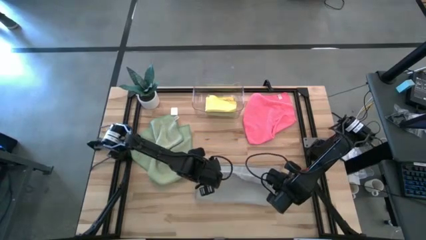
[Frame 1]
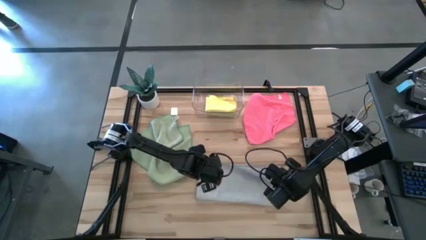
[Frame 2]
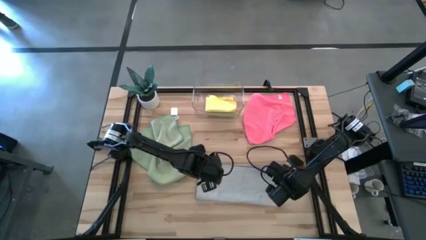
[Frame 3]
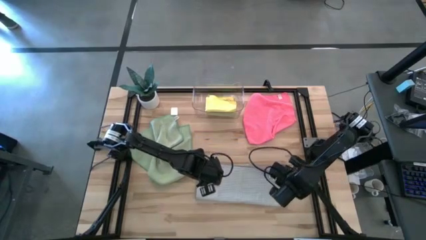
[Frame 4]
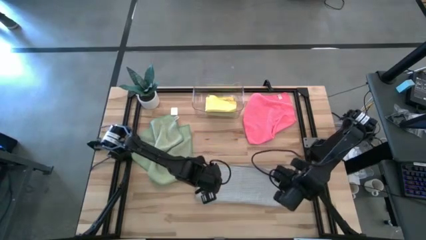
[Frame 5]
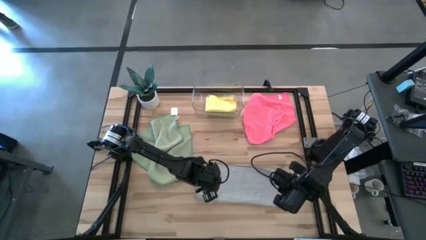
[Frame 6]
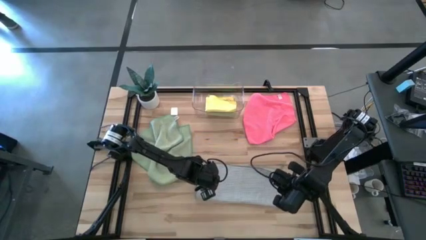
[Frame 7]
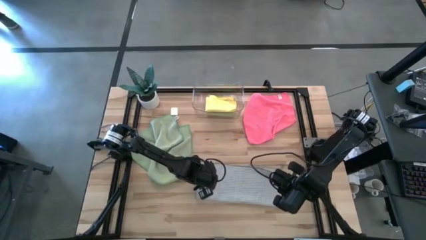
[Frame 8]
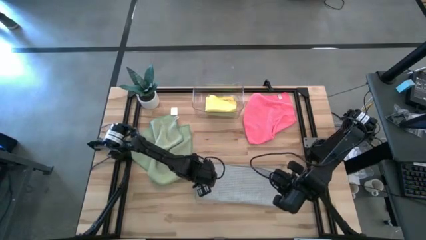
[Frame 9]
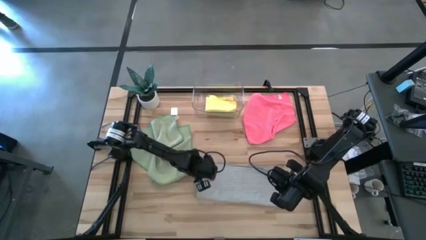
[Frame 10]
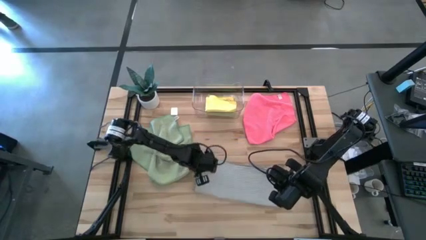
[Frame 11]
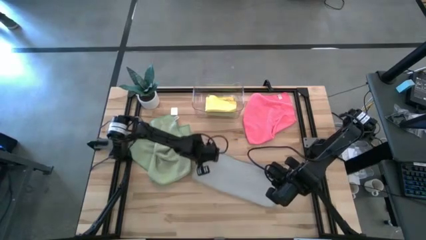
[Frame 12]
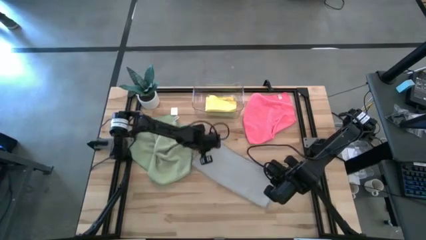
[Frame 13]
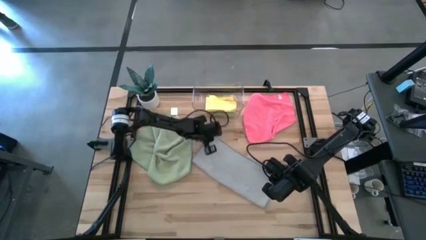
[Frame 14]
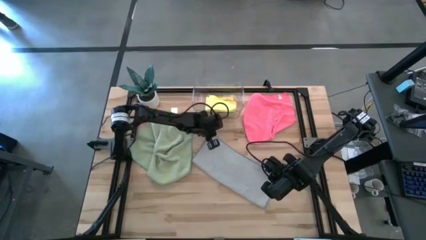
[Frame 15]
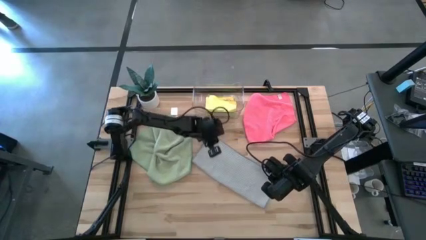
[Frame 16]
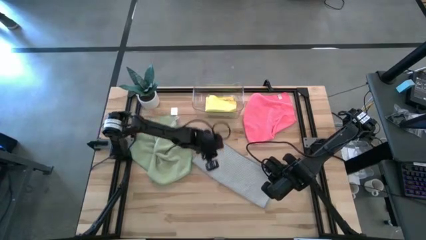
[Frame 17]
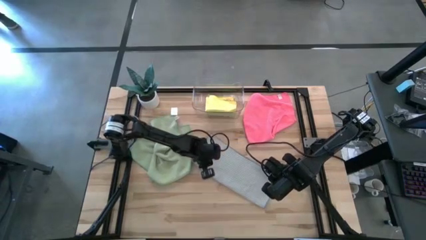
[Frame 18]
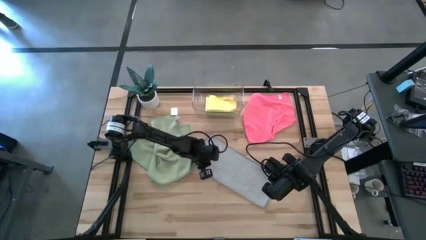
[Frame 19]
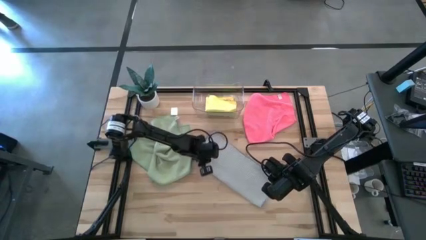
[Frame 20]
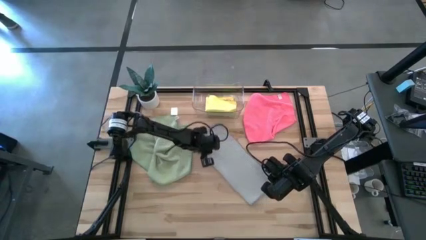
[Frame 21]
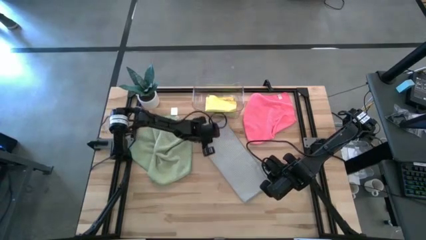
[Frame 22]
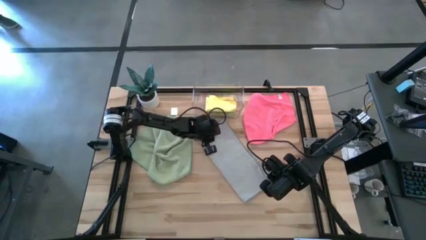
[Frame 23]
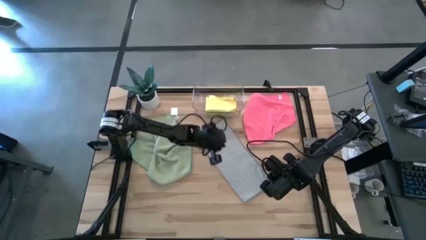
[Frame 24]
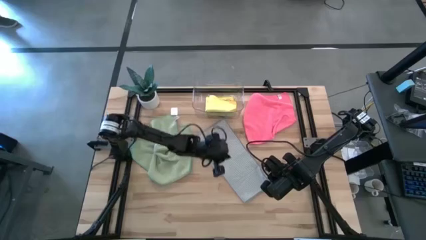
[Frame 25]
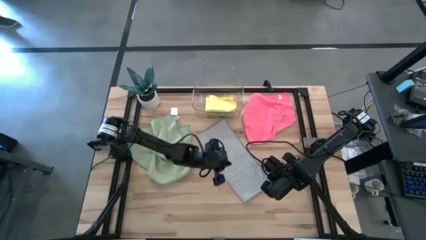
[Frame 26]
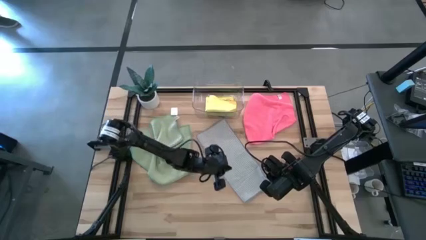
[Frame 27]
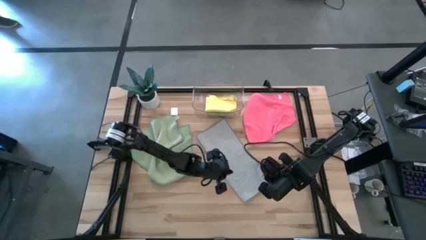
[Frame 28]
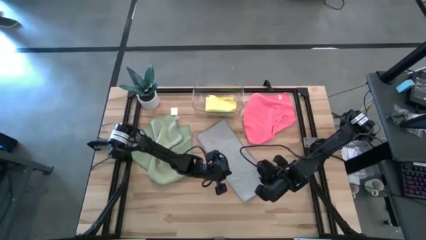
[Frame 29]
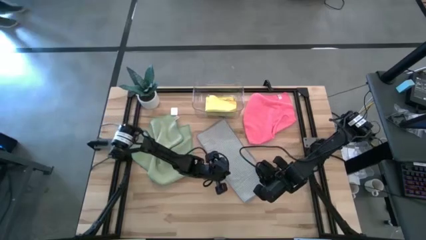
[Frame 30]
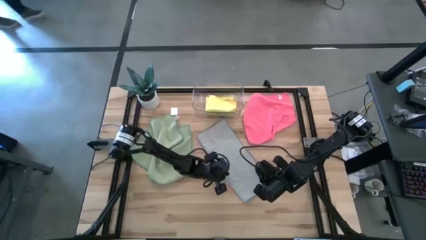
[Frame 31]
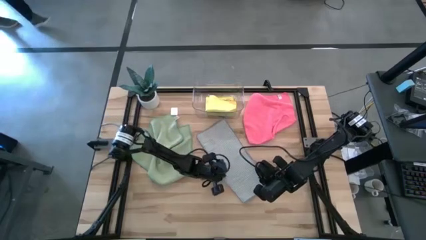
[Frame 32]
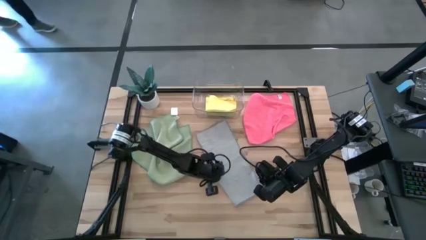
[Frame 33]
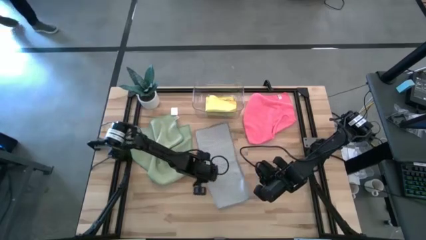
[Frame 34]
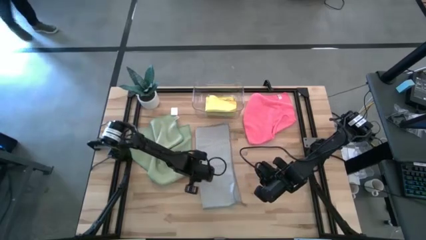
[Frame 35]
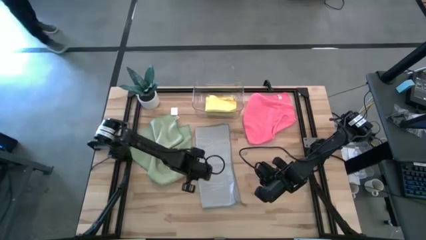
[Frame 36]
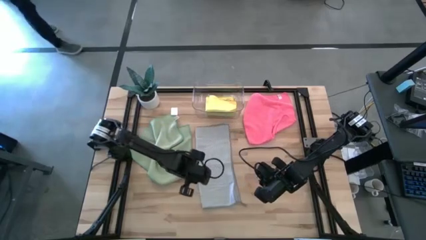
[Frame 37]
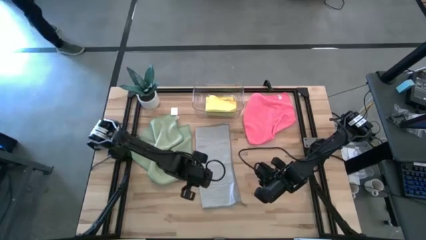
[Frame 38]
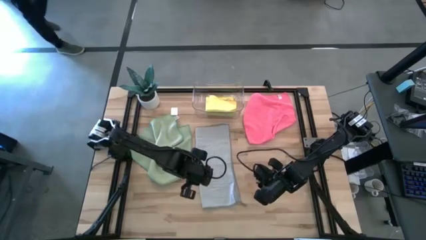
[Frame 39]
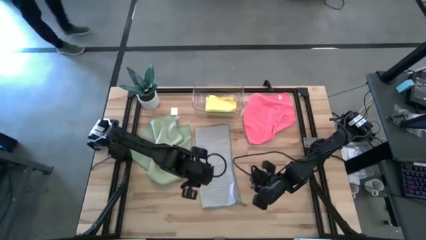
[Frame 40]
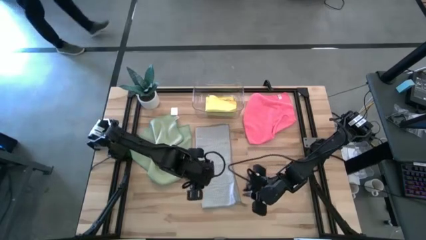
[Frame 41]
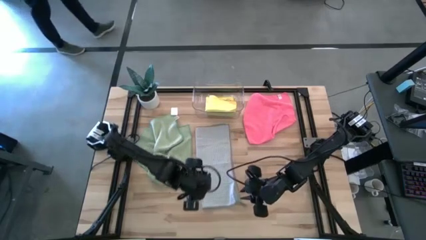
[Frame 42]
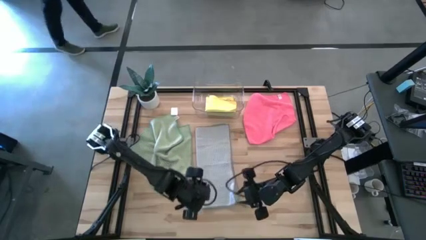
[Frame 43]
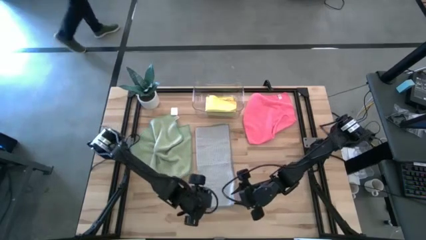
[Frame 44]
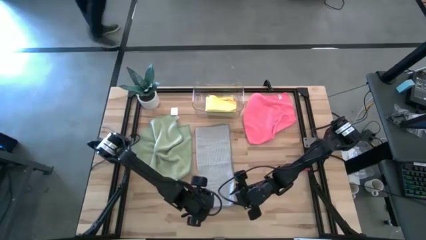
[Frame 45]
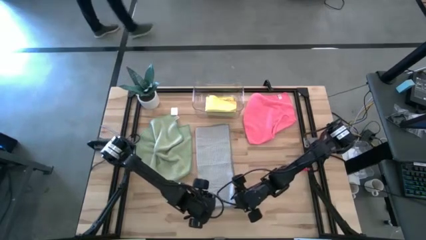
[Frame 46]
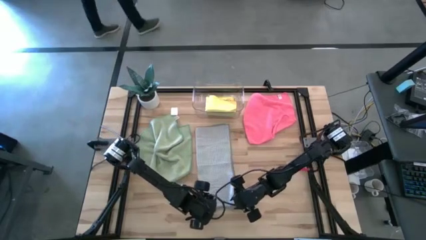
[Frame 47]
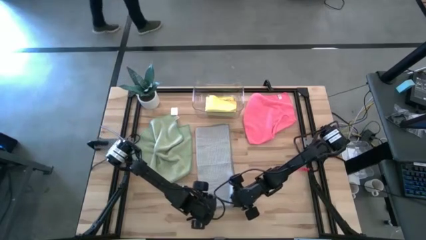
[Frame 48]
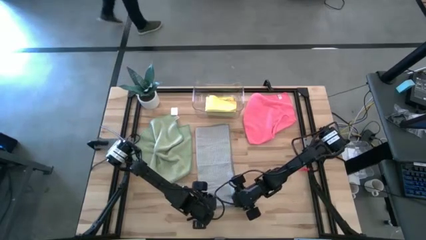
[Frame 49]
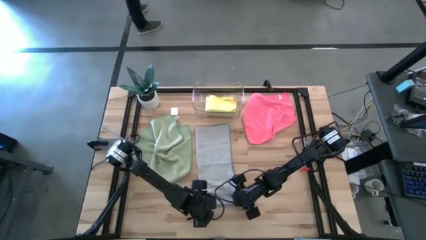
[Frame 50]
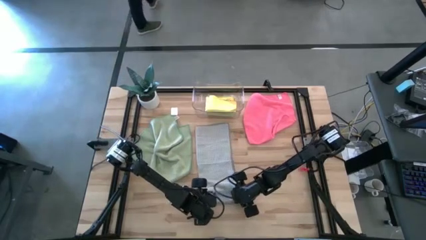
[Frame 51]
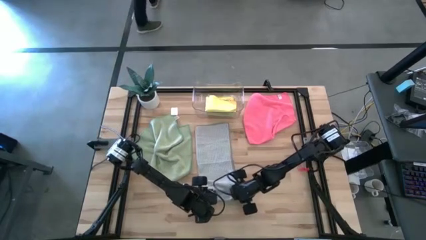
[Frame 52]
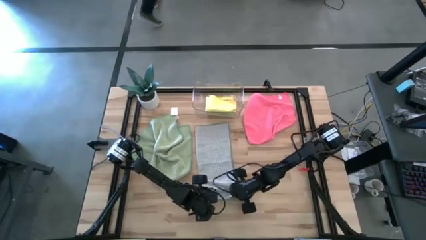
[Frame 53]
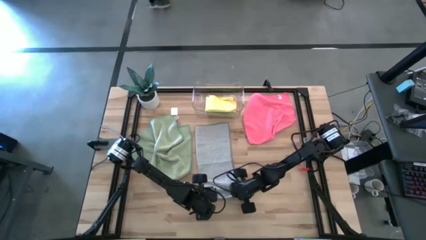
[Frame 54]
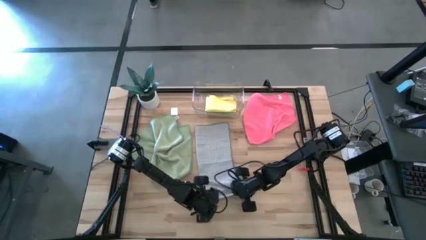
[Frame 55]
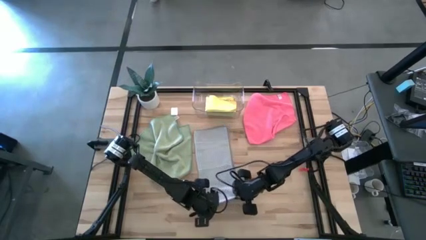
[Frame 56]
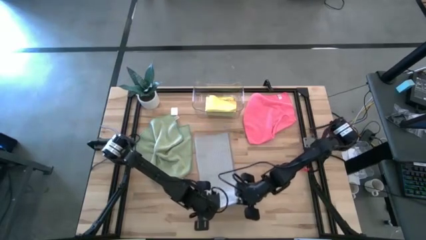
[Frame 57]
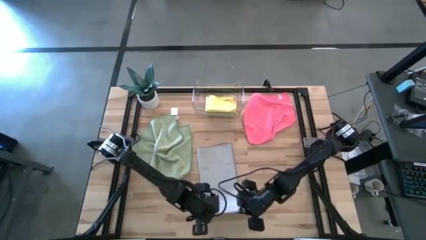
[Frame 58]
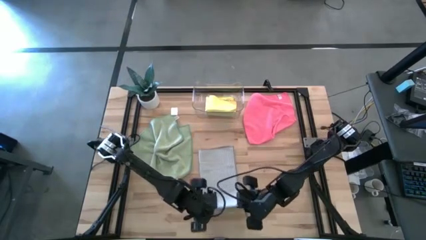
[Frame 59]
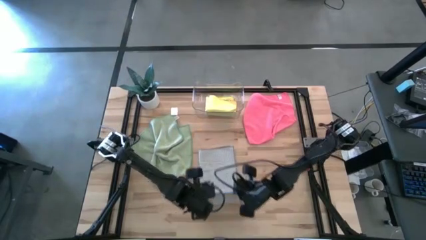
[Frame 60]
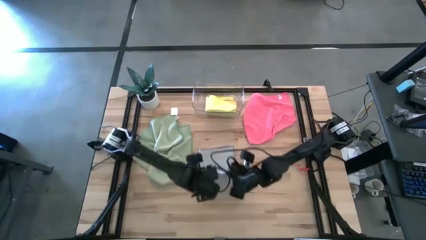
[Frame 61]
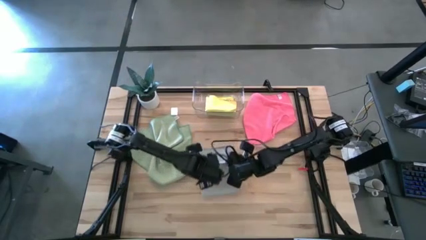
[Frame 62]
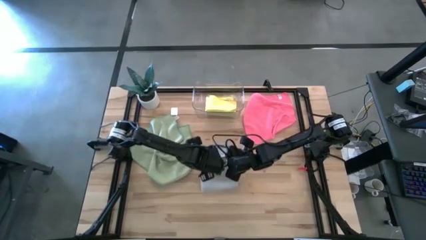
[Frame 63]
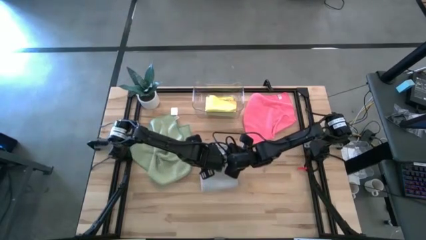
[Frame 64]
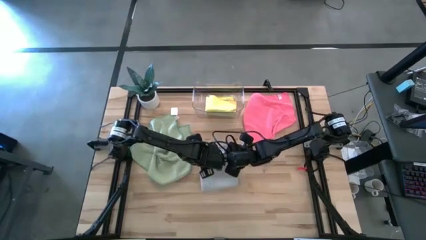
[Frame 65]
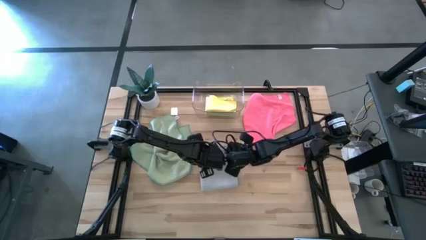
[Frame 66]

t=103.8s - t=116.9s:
Task: Fold microfiber towels
Fold the gray microfiber cloth

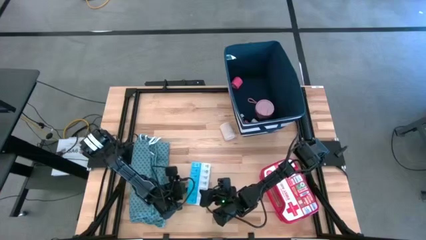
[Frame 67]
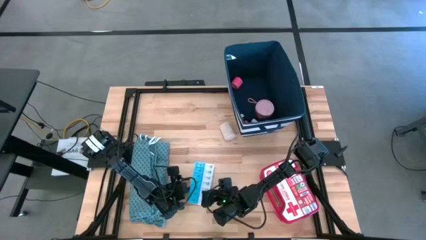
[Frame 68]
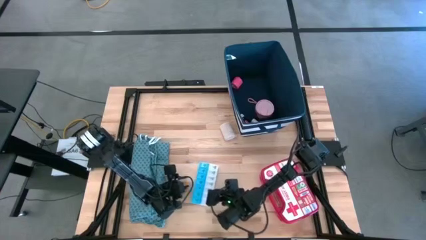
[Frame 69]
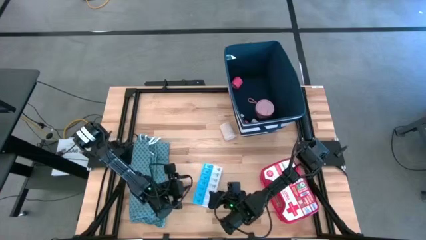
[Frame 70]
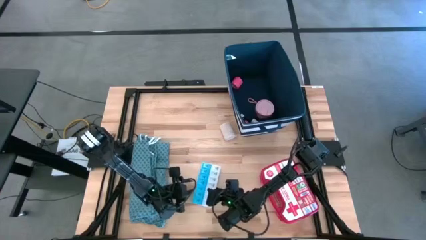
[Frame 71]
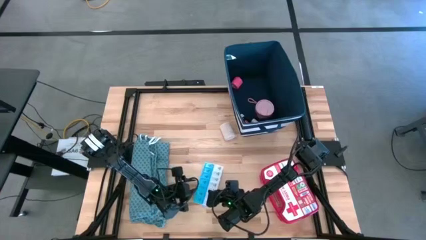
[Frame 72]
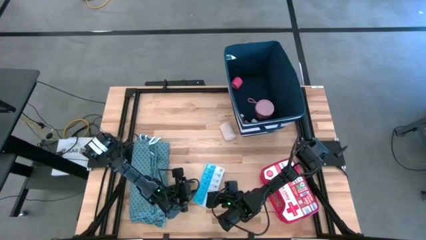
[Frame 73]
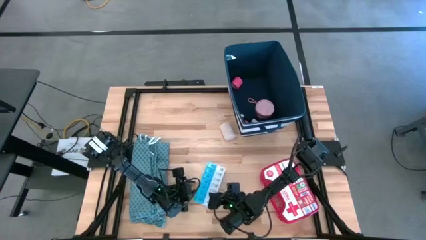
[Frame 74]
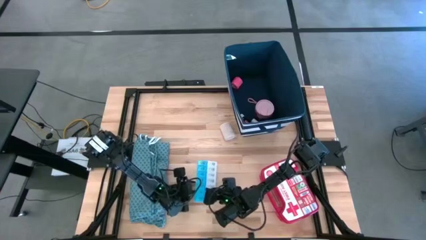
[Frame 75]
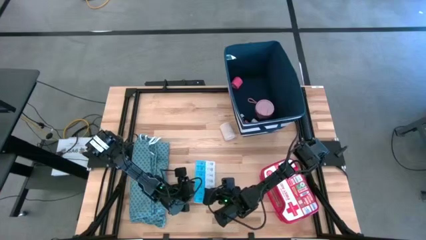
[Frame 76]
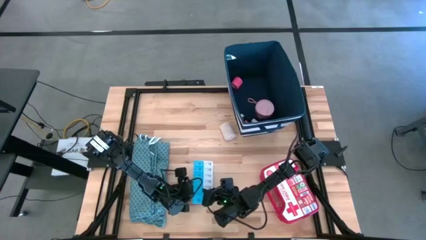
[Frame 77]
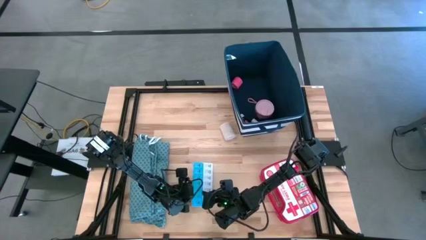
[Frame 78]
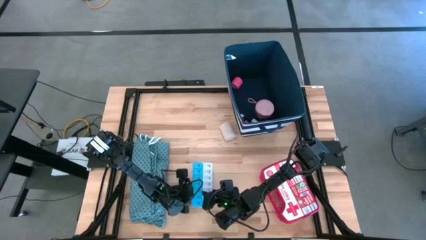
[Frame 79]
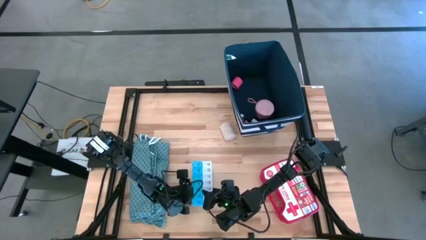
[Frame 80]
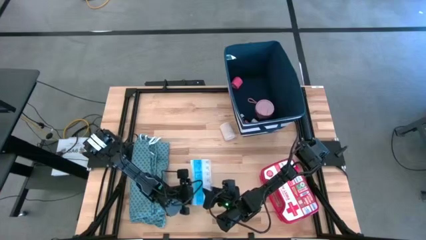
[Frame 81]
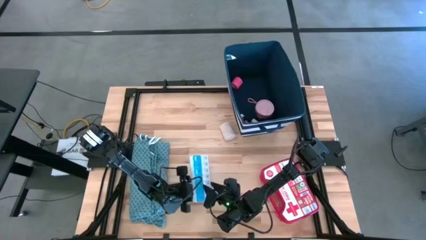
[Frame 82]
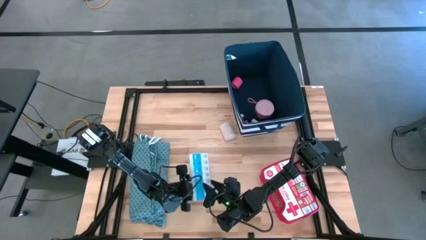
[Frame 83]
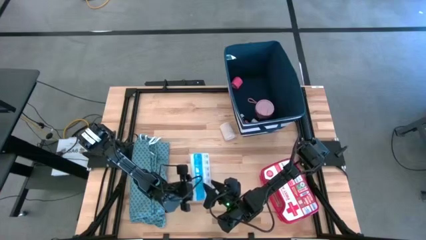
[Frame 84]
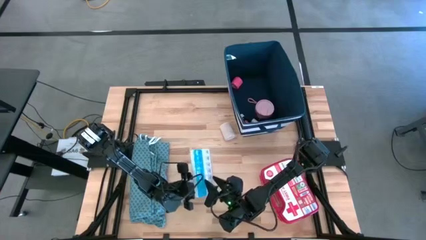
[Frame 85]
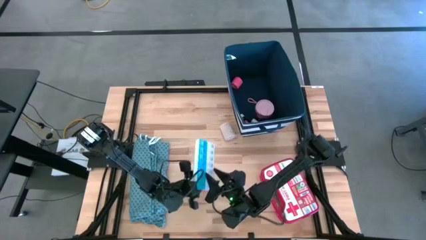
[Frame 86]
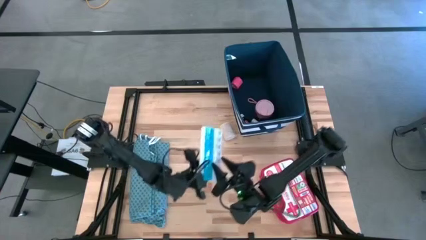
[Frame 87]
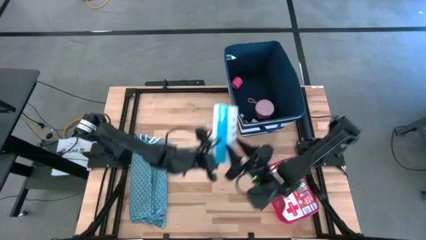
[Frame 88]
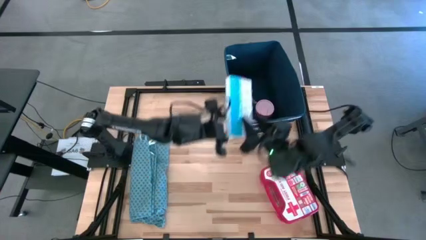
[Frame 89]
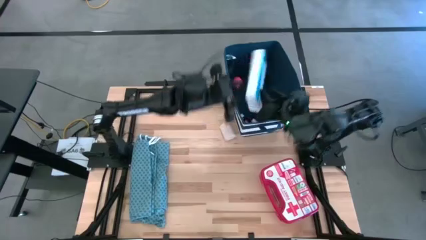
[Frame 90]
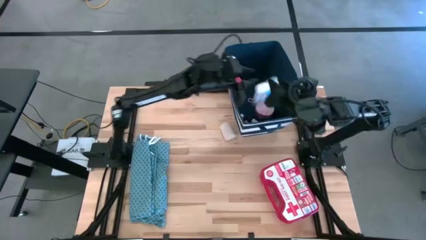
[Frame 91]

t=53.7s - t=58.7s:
Task: Pick & place medical supplies in basket/bin
Put the white and blue medicine organizer into the blue bin
